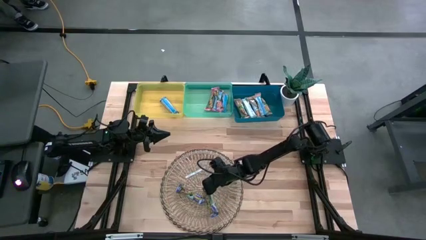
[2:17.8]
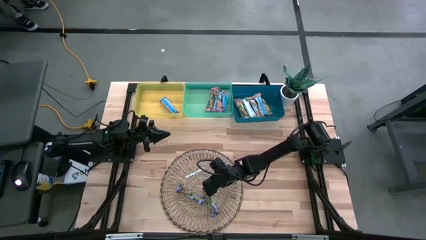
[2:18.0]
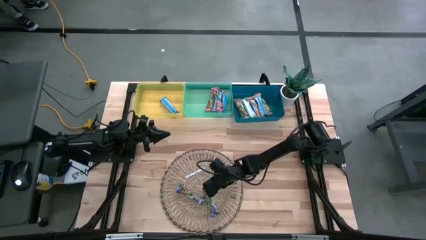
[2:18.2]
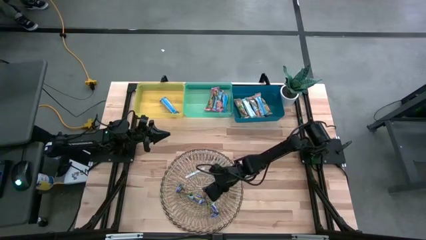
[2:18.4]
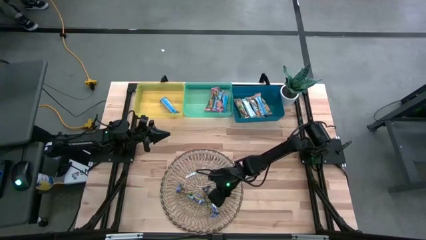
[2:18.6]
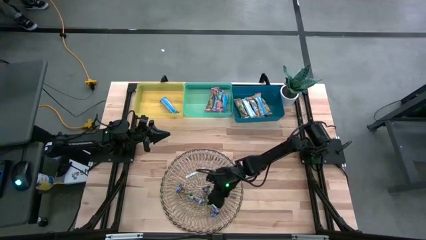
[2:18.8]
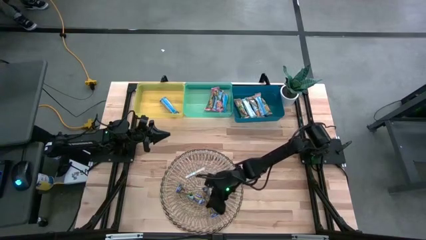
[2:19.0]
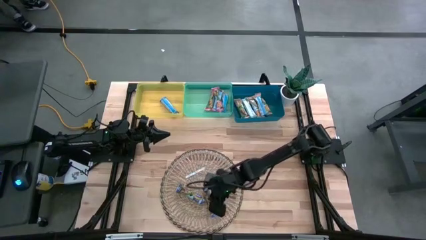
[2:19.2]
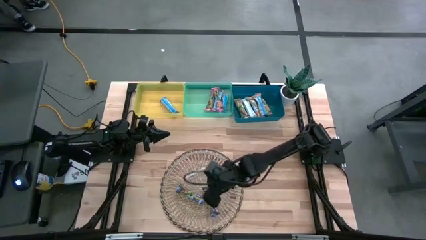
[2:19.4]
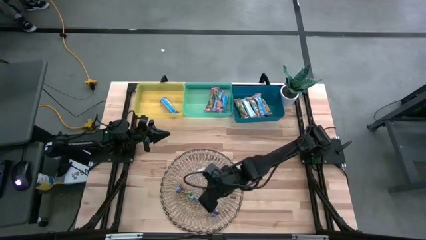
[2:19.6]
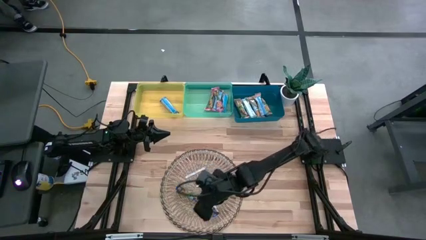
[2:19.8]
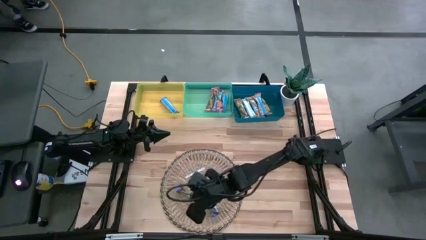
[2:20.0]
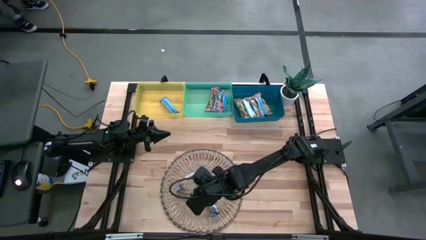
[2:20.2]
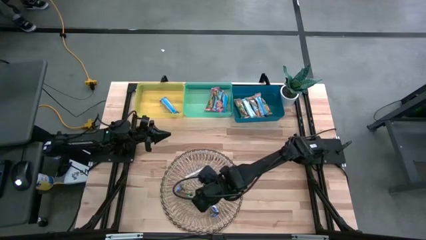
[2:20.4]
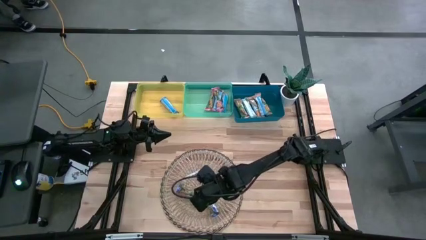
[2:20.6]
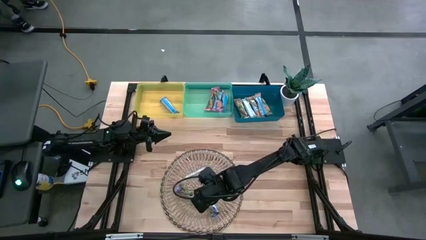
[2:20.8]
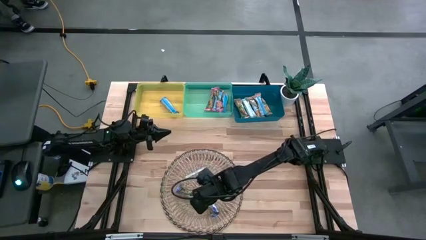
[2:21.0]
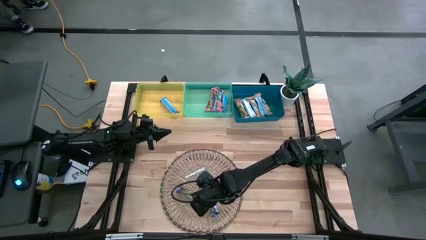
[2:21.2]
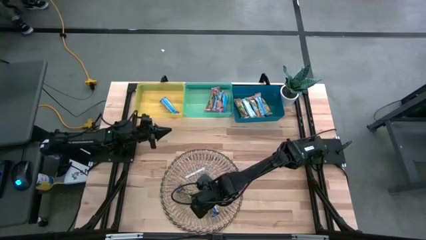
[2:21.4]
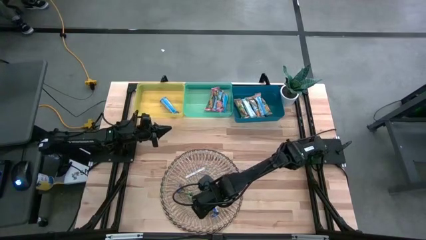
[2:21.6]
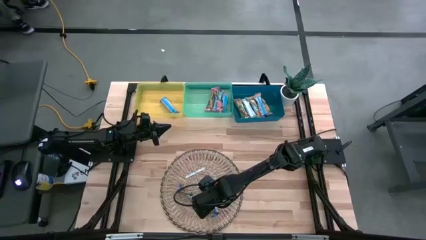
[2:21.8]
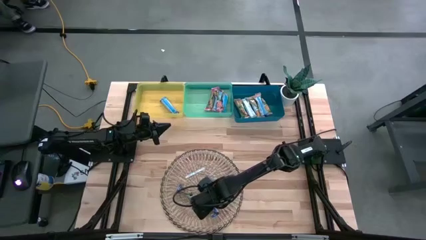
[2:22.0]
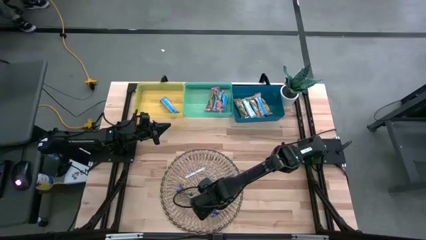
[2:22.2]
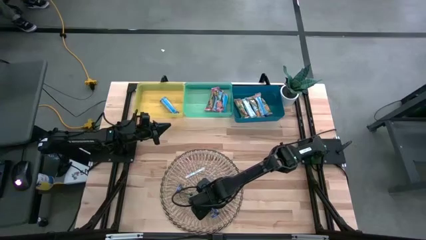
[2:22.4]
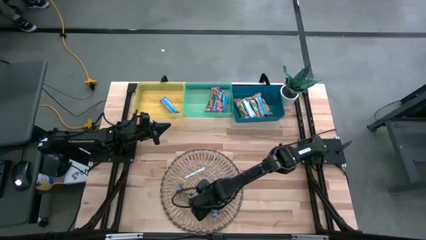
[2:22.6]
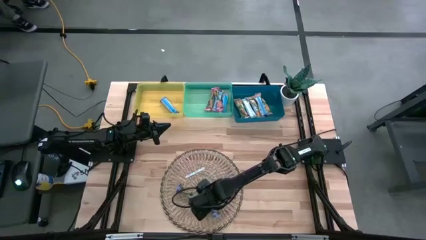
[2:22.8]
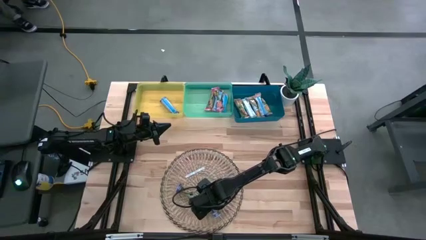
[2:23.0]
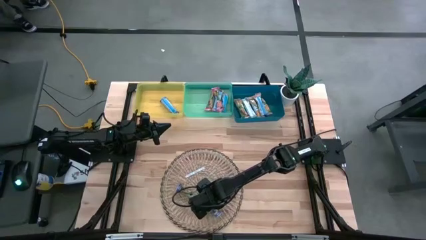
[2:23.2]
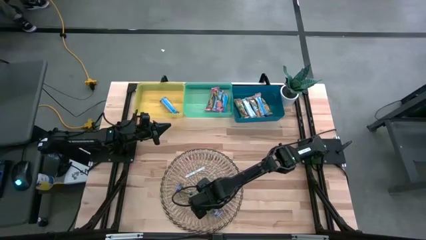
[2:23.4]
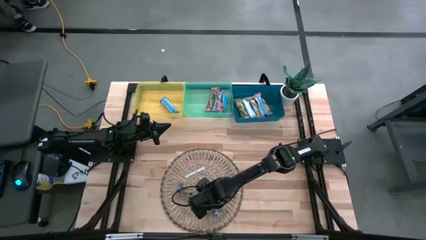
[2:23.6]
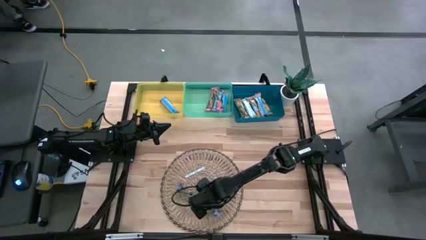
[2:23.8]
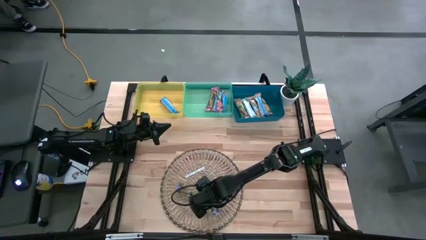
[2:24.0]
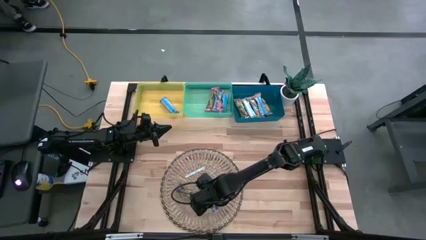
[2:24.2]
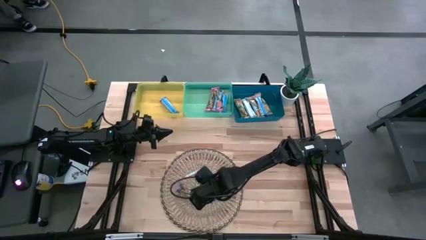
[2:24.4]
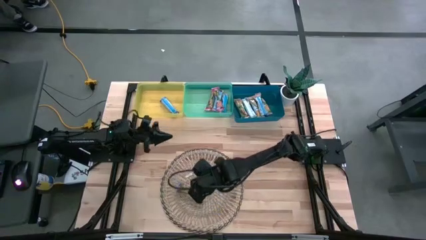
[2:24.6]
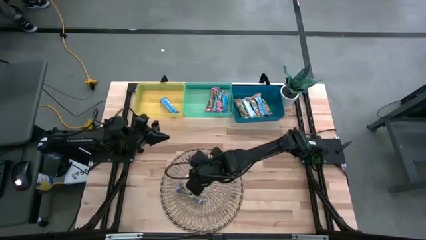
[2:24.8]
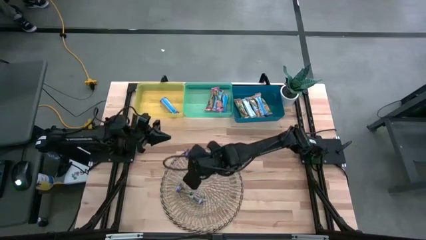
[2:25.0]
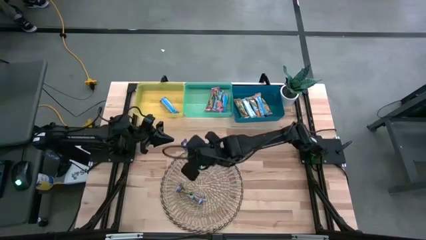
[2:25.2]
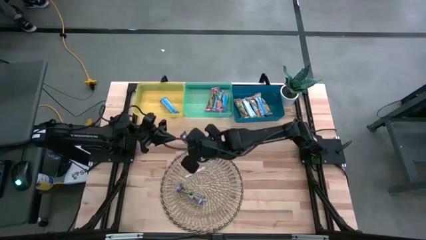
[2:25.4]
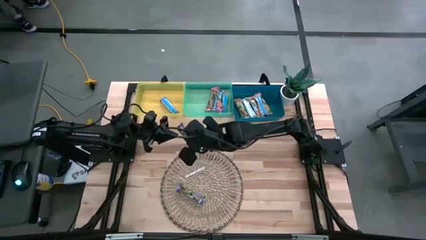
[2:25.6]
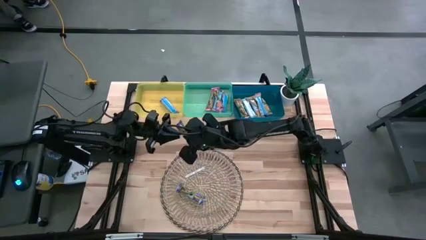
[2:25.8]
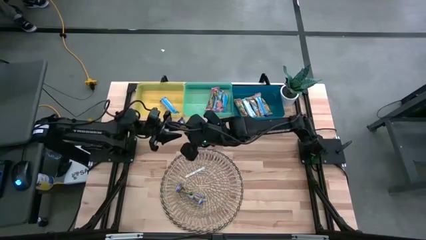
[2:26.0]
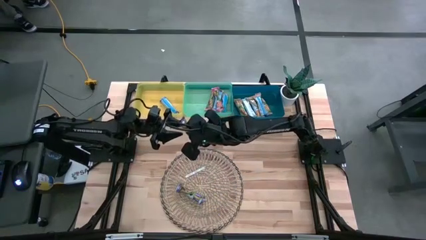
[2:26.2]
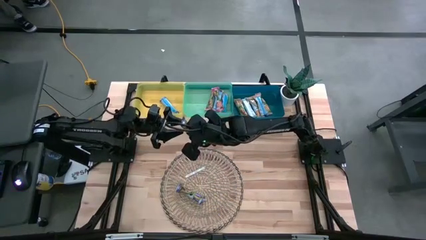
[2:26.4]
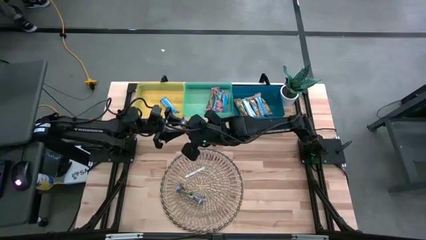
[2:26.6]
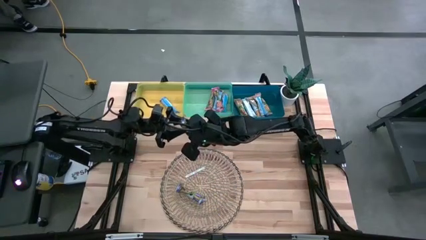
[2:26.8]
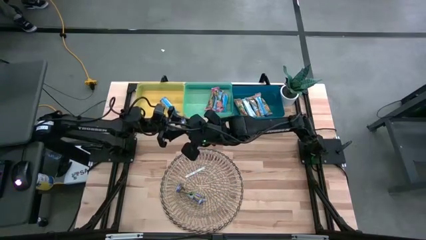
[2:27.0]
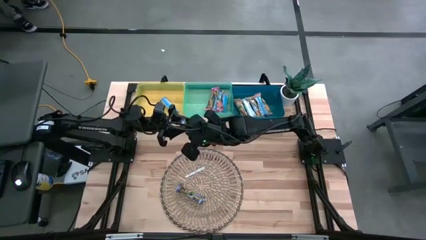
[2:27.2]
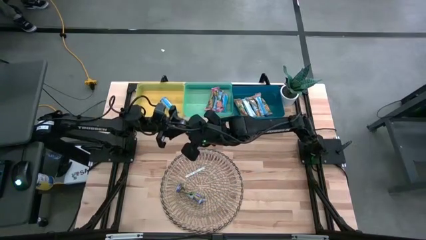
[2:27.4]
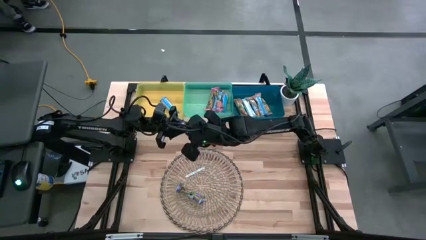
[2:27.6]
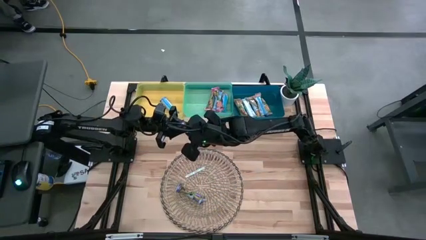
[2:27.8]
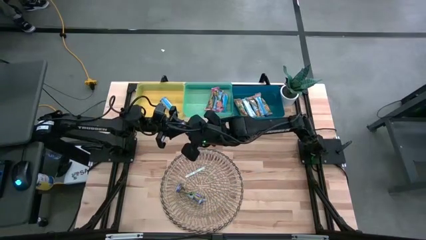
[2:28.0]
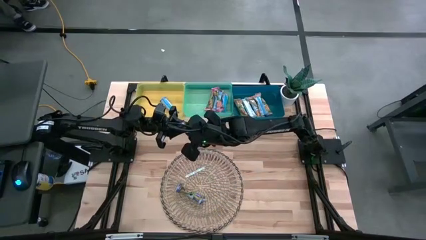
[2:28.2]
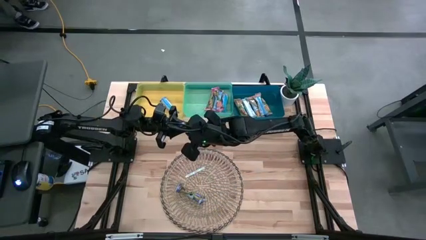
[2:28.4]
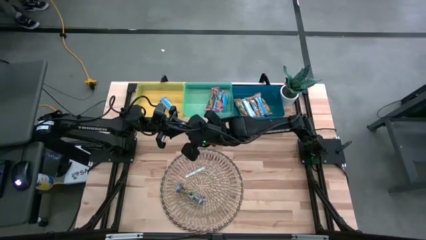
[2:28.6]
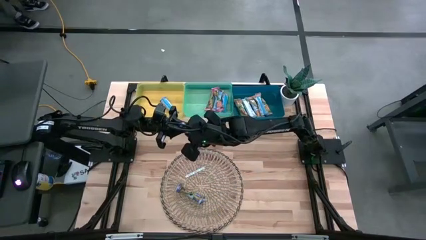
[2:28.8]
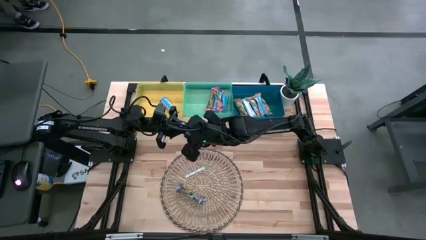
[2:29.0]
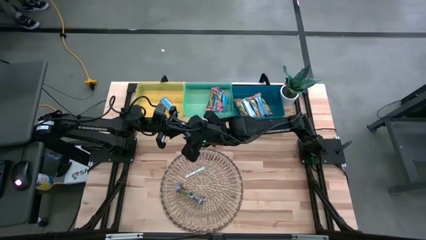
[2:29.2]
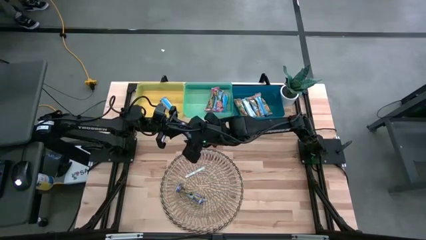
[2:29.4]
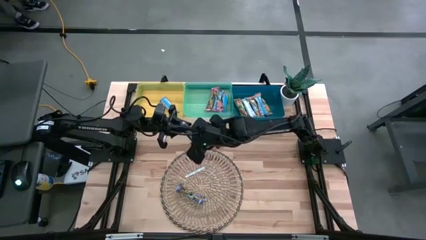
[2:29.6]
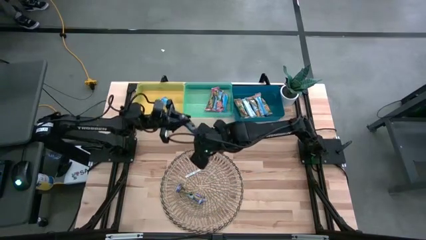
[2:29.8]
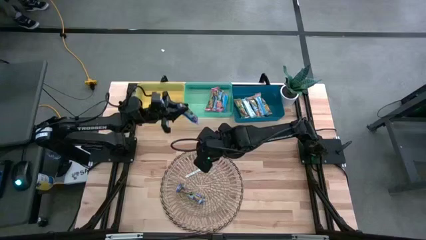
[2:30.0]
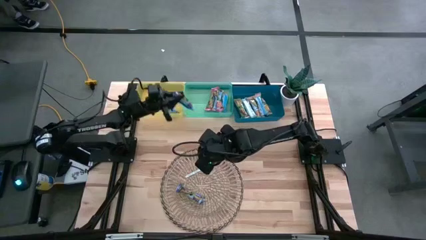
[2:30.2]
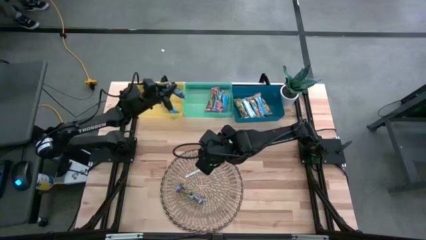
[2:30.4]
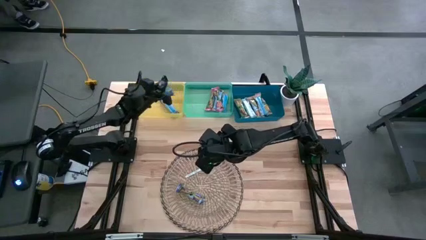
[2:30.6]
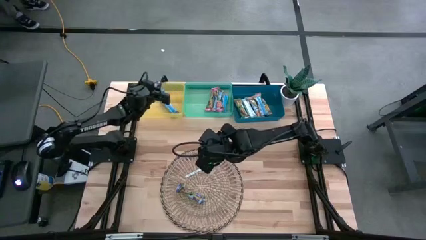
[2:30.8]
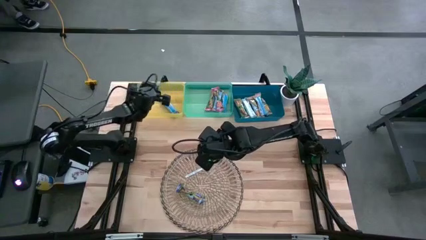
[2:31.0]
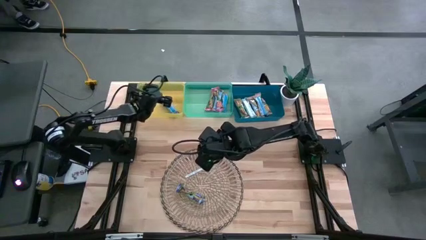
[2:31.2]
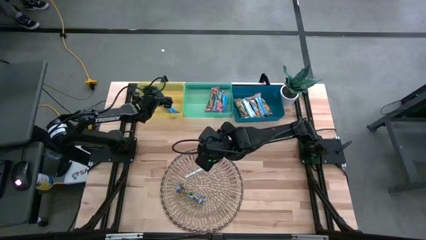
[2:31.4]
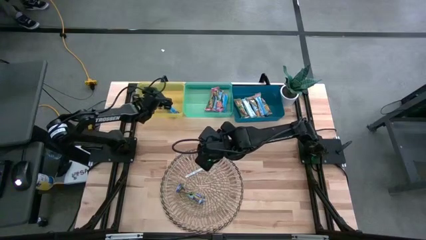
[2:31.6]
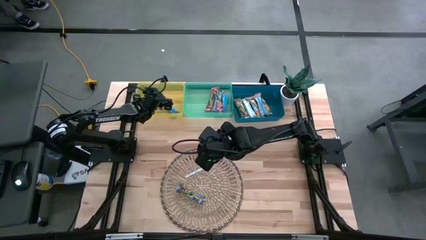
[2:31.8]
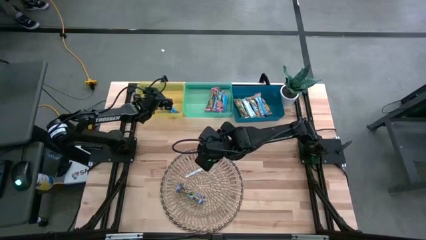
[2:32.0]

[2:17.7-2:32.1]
Task: Pick and place Granola Bars by type
Put the blue granola bar into the yellow bin
